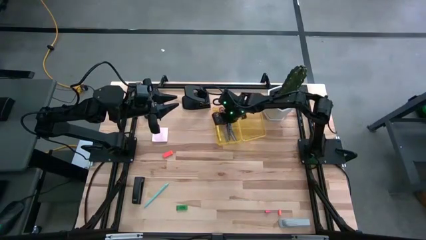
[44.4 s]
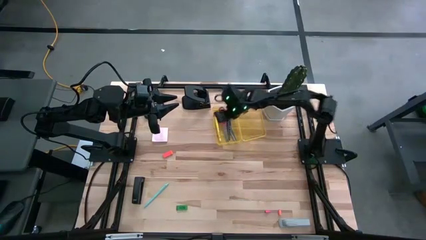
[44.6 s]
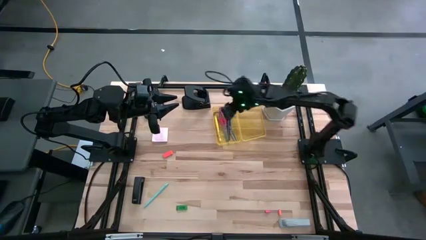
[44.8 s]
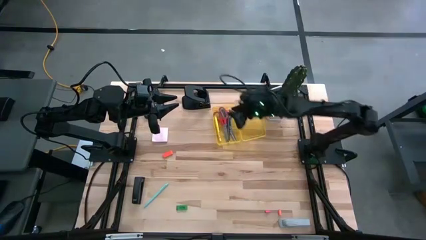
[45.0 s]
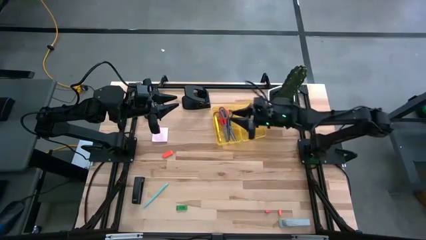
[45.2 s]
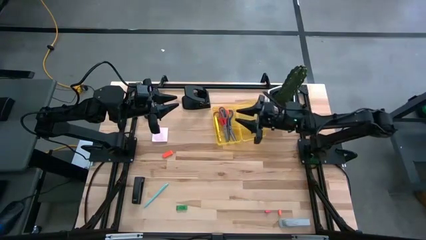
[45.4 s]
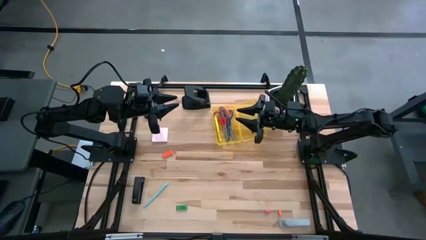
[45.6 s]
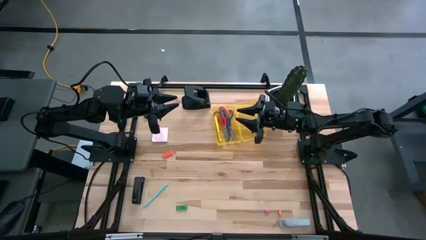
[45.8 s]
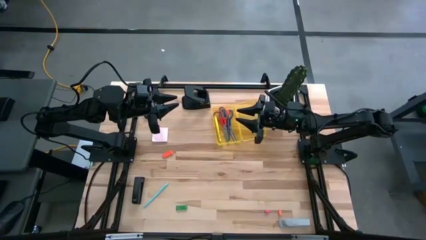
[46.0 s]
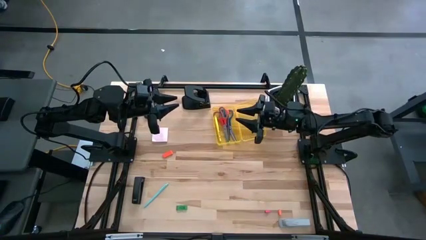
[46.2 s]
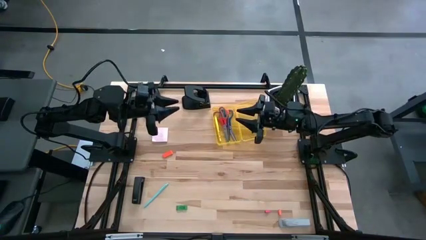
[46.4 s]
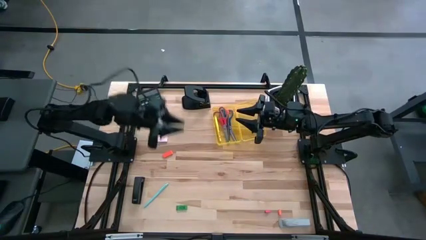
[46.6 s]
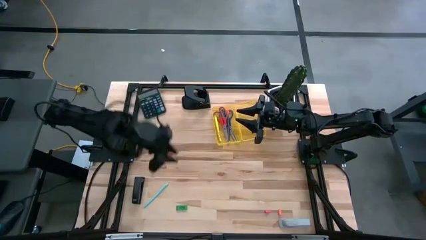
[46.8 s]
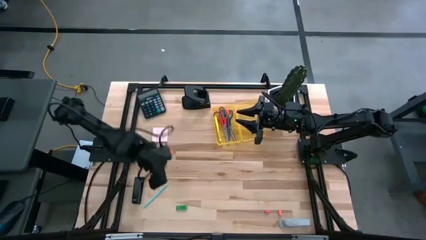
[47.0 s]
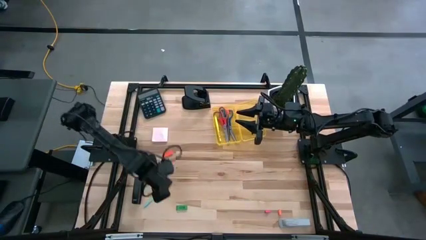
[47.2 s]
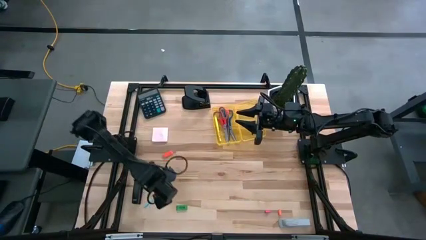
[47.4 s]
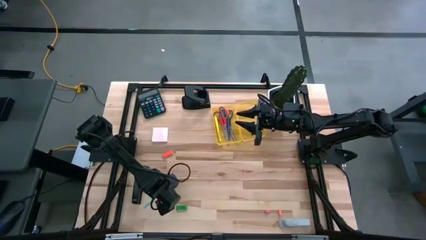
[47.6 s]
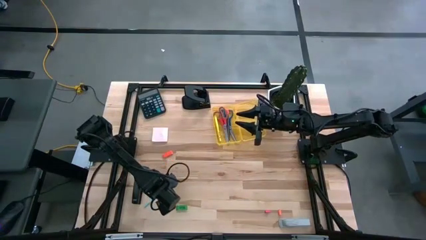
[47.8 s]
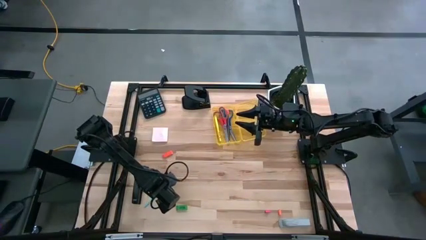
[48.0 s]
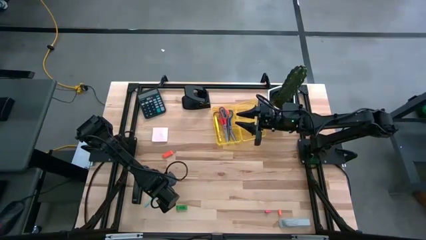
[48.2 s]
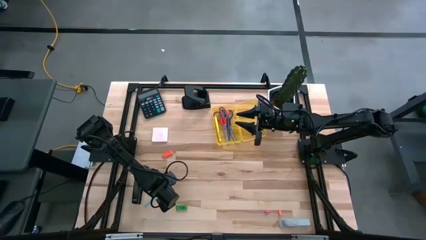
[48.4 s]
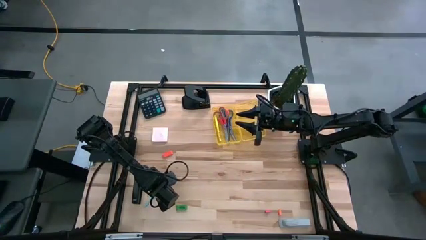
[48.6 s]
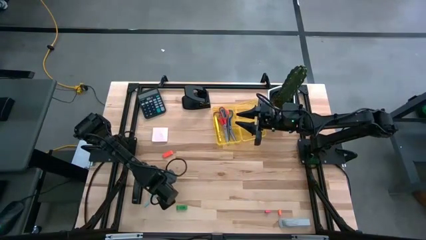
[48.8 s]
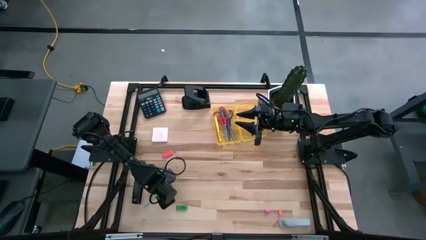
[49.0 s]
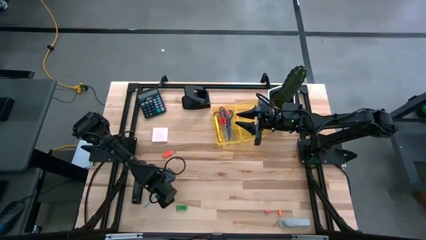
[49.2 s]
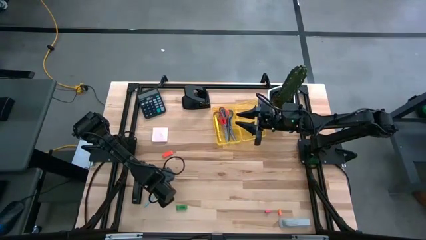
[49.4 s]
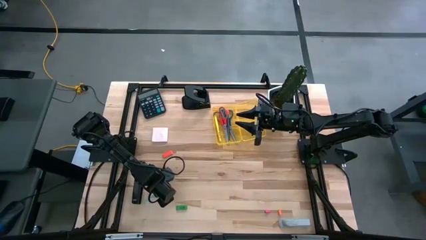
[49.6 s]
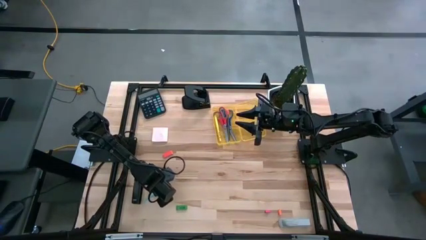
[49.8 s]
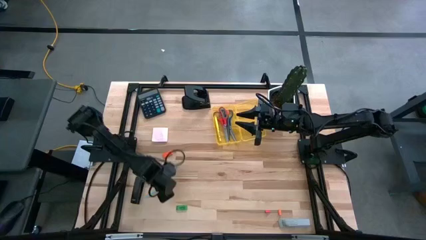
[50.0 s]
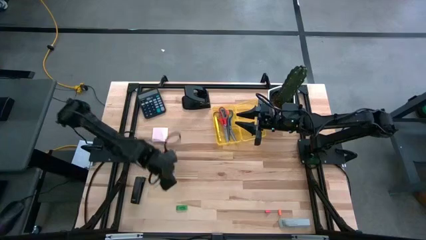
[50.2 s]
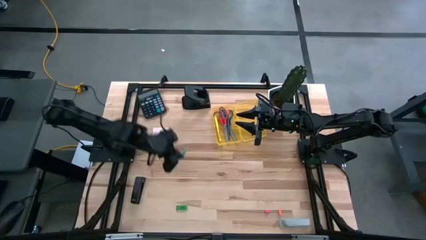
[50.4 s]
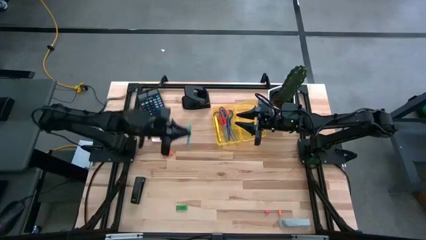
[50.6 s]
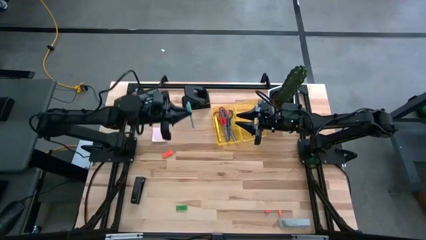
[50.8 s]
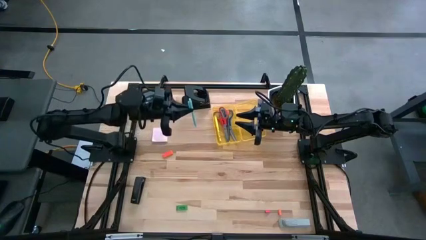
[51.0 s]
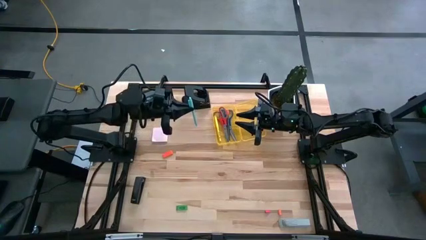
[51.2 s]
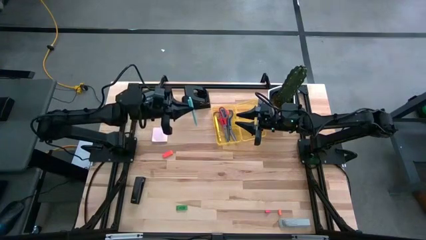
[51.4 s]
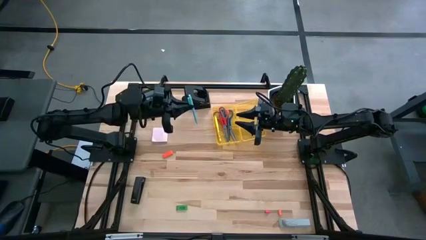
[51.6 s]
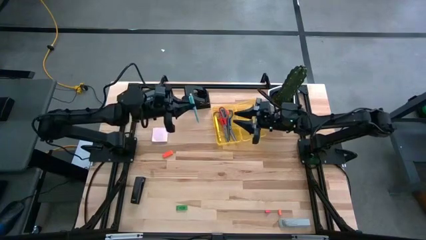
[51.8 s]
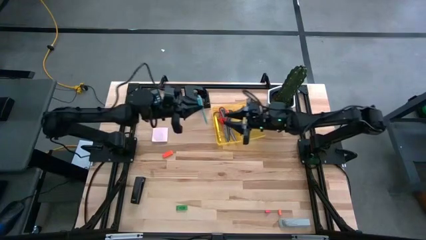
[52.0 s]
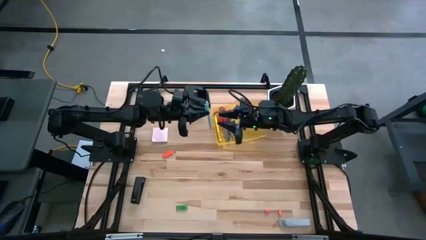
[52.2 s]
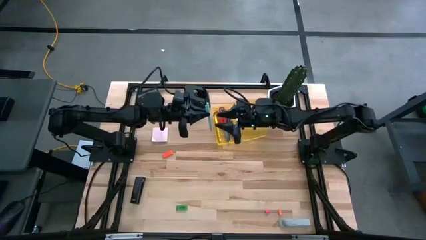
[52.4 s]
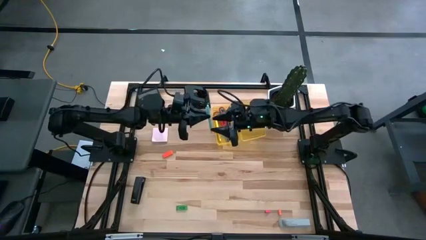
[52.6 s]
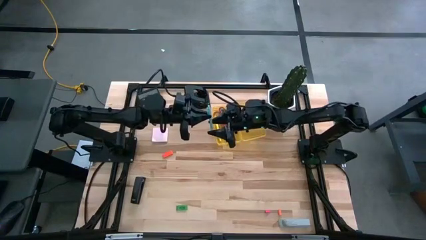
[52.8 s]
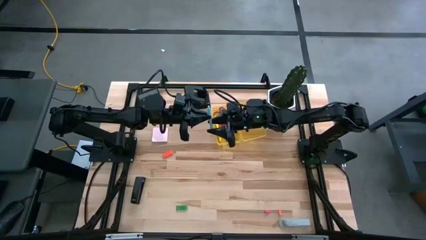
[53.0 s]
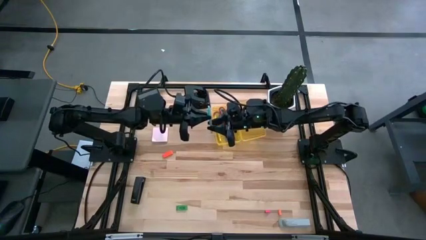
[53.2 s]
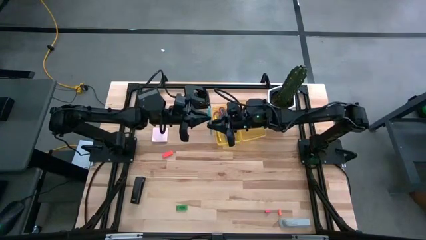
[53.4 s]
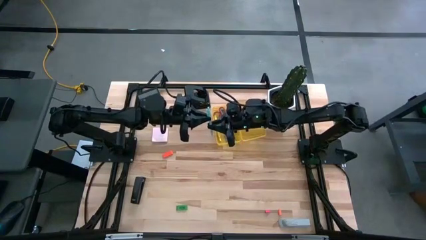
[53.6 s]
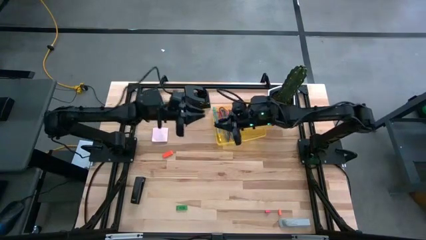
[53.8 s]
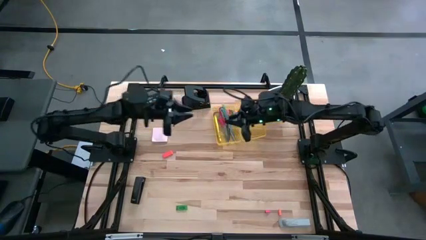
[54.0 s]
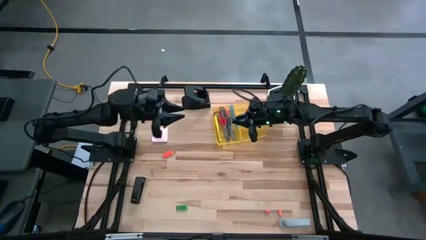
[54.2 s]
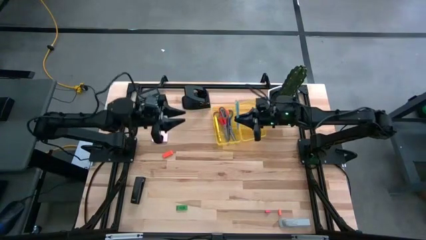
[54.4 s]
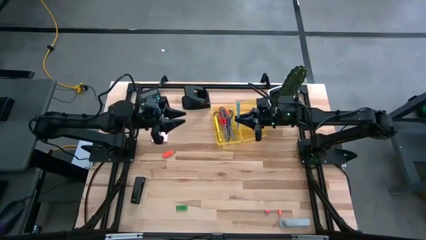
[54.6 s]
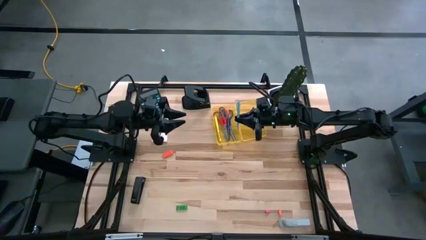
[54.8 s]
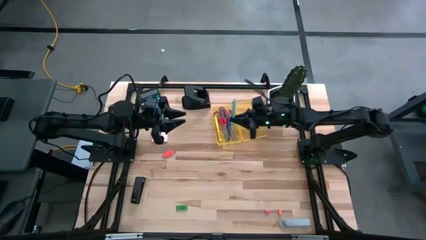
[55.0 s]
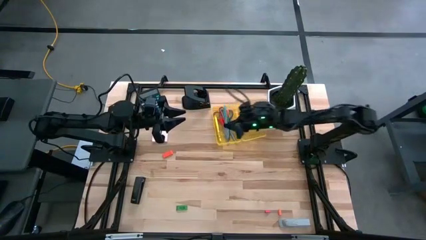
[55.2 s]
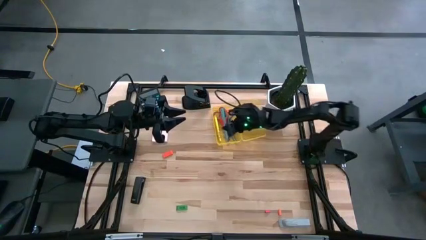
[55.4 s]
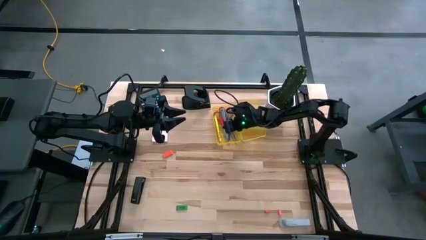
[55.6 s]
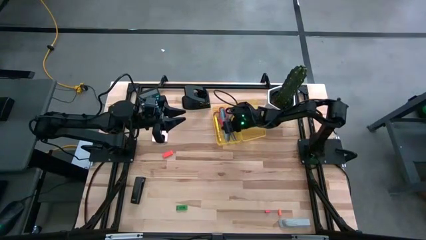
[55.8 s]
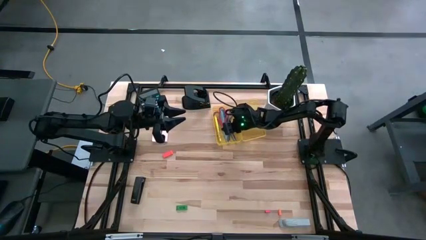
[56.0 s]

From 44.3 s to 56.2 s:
Task: Pack school essentials
Put the light blue ballpen into the yellow supply box

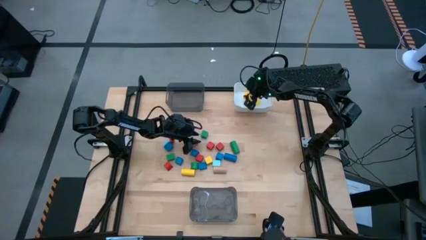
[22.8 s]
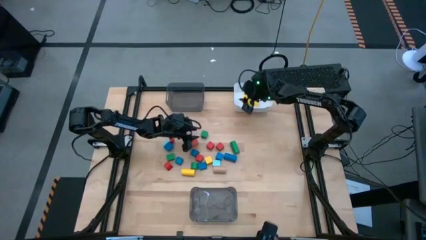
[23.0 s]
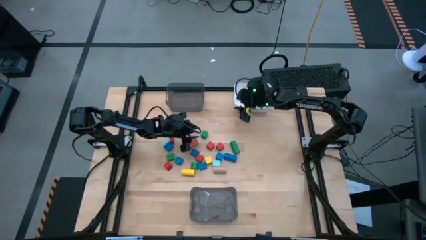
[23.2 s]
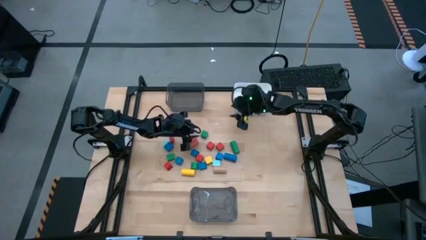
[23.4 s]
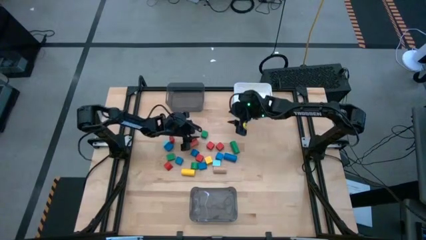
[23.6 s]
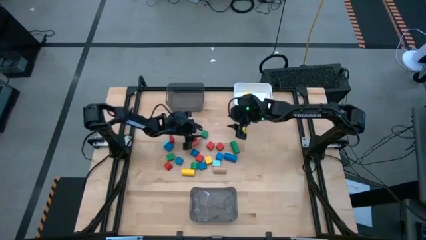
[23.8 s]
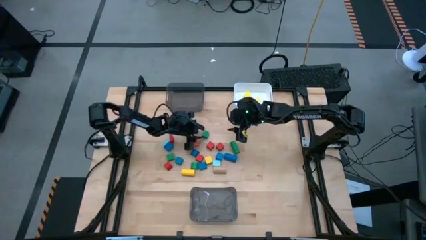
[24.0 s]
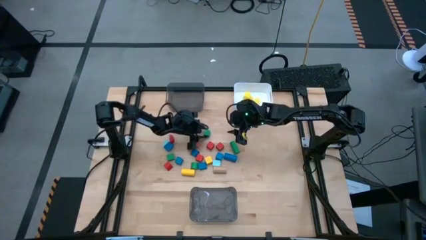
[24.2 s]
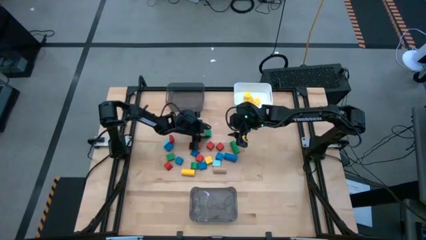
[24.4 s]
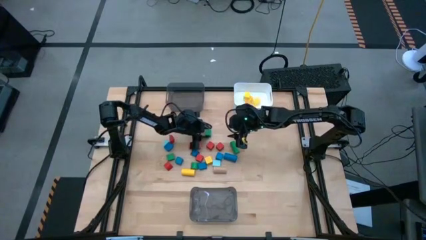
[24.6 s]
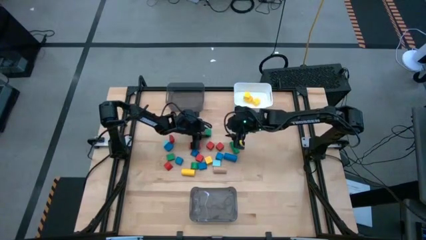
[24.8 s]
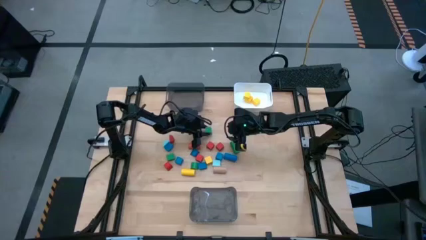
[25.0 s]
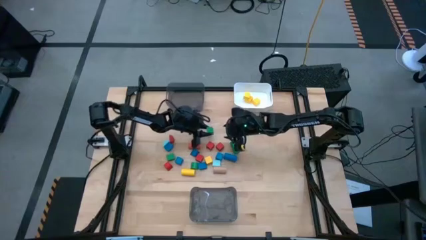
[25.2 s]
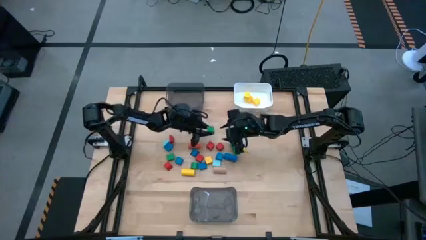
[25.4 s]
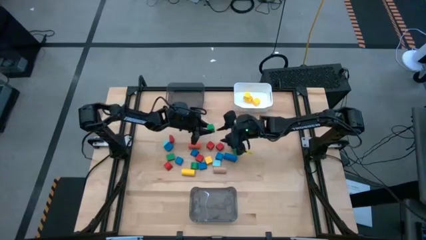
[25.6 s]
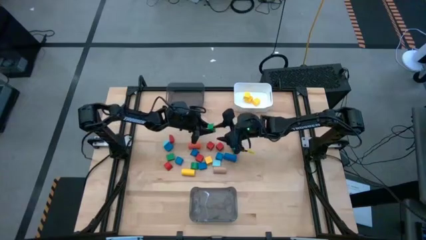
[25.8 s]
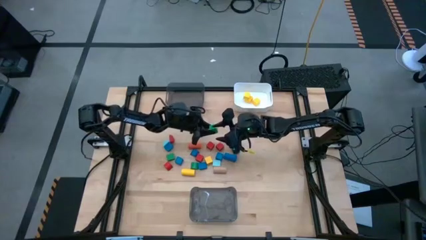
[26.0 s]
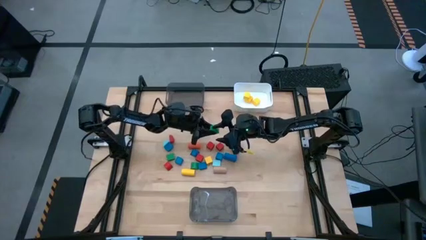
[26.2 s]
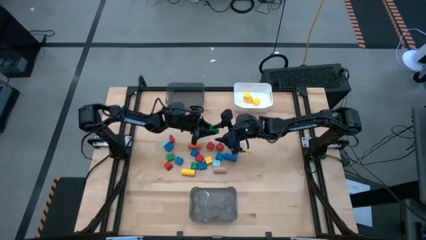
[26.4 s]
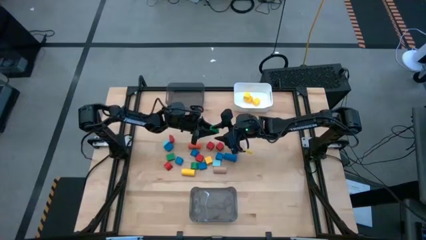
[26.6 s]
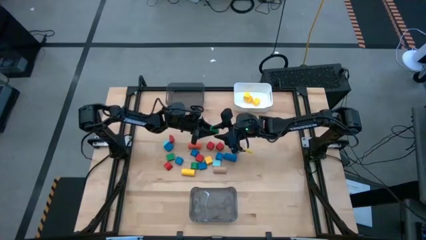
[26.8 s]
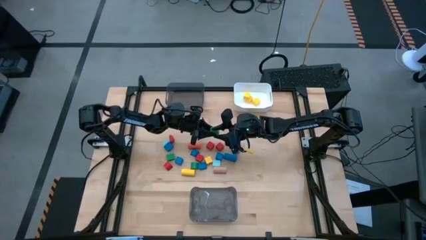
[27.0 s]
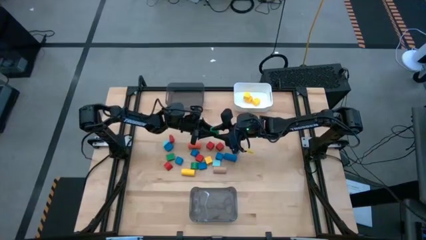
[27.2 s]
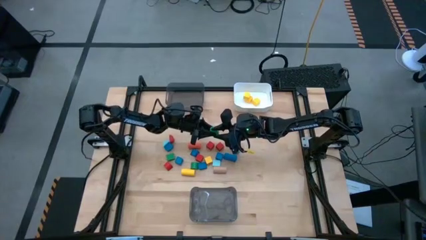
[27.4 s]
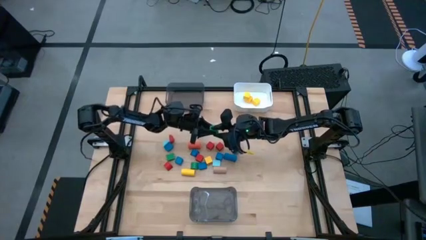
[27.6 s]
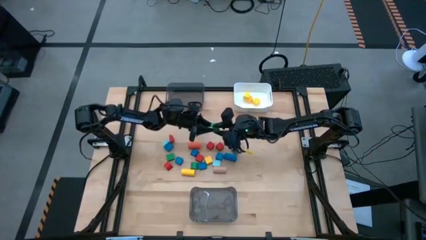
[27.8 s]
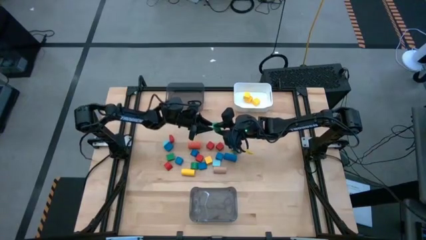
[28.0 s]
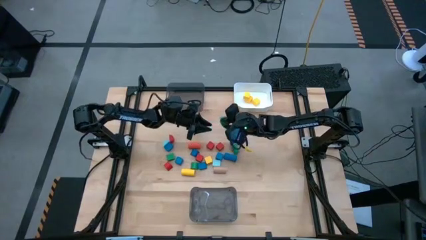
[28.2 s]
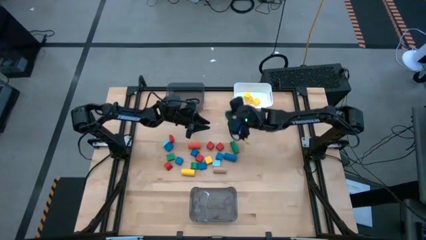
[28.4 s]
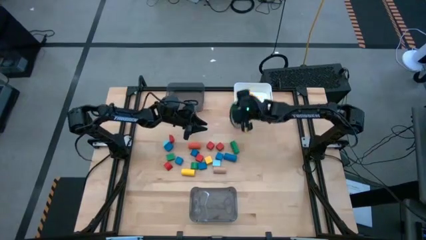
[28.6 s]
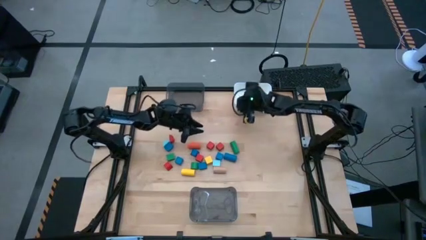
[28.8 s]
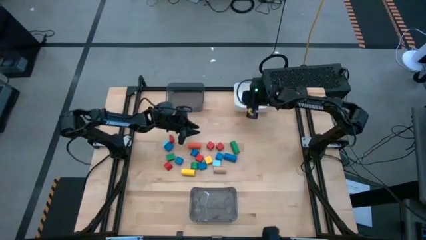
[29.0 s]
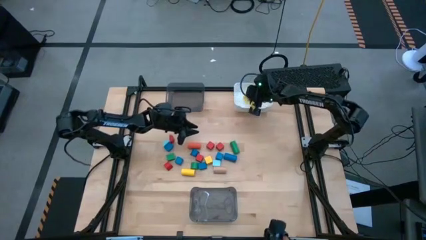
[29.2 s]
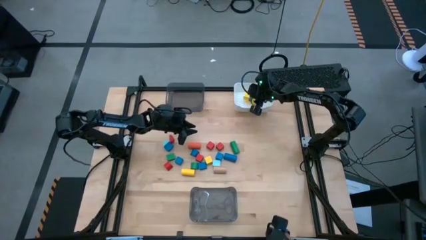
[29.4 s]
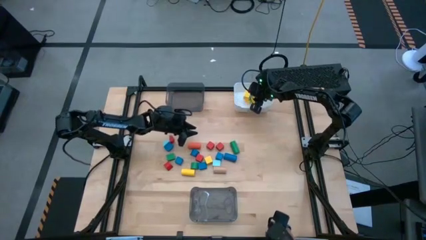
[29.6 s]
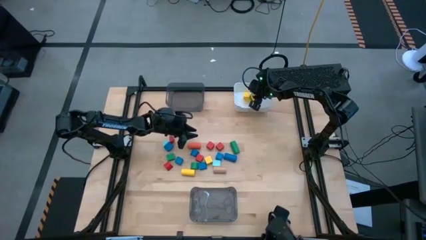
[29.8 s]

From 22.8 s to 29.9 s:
Task: Sort blocks by size
Put the green square block into the white bin
